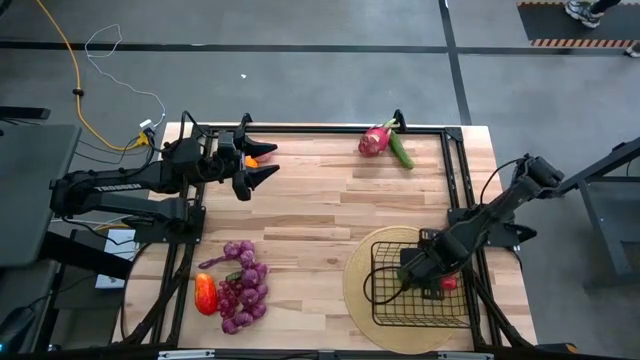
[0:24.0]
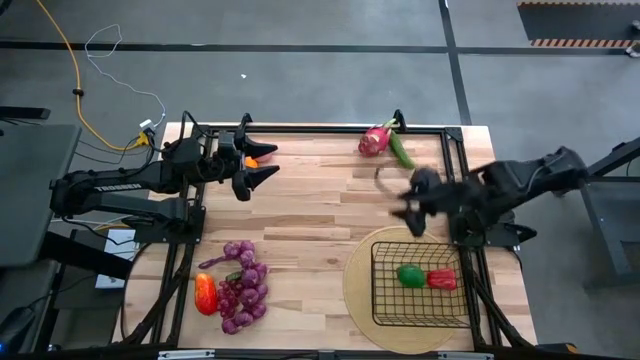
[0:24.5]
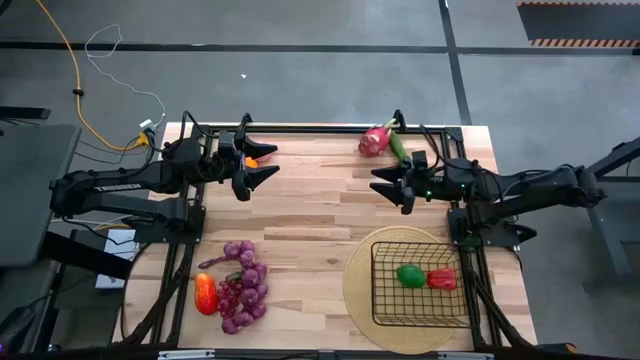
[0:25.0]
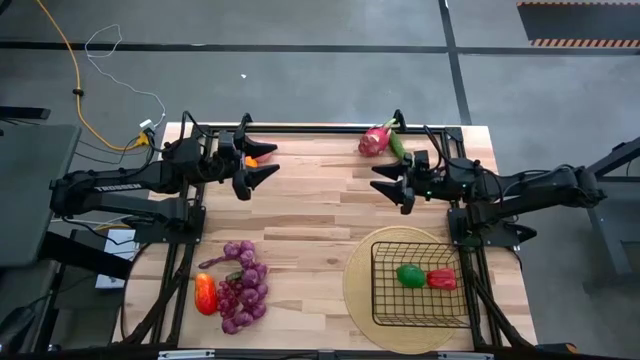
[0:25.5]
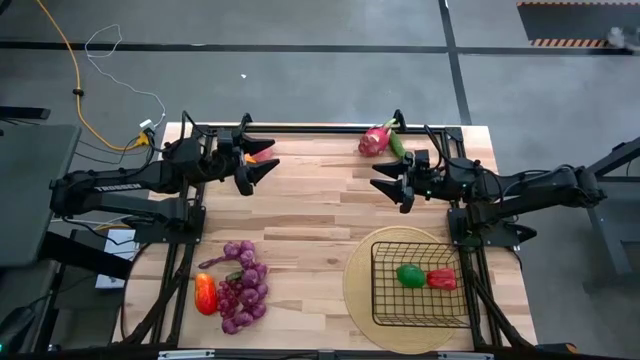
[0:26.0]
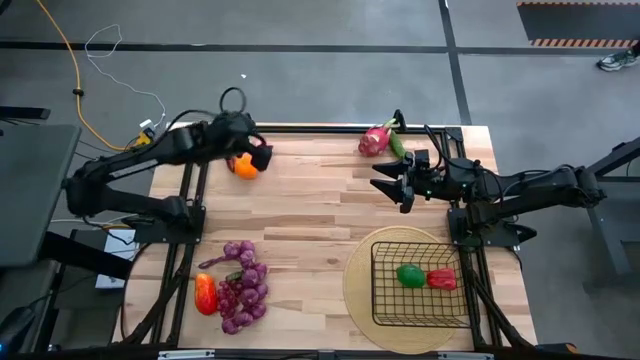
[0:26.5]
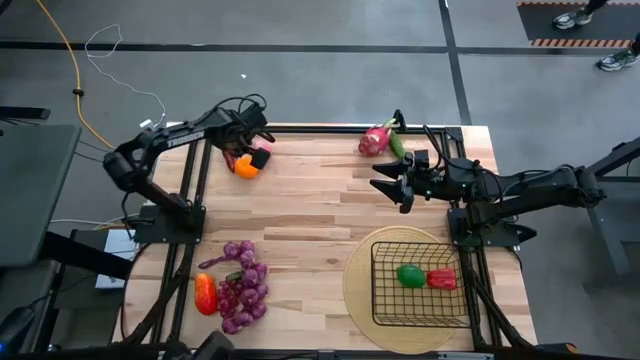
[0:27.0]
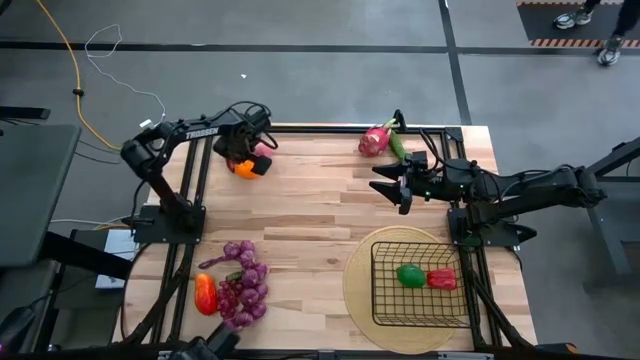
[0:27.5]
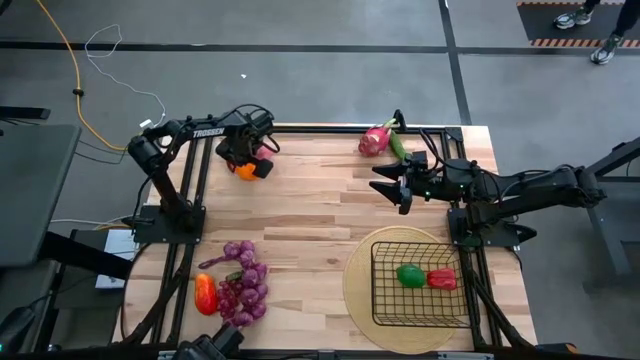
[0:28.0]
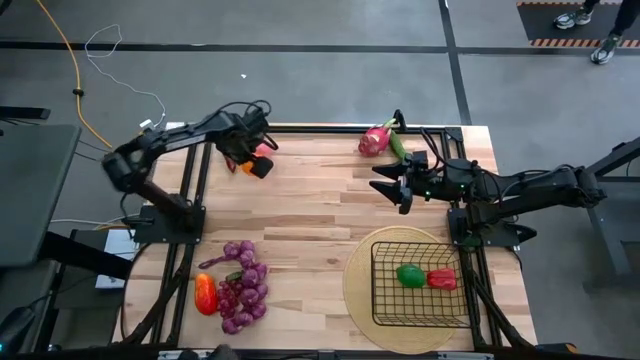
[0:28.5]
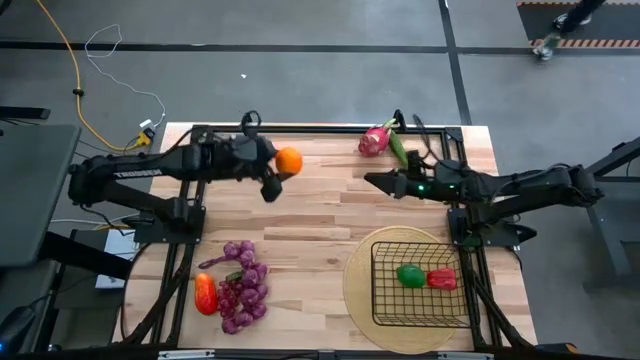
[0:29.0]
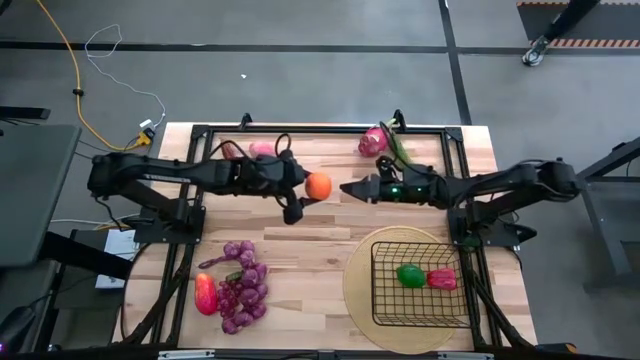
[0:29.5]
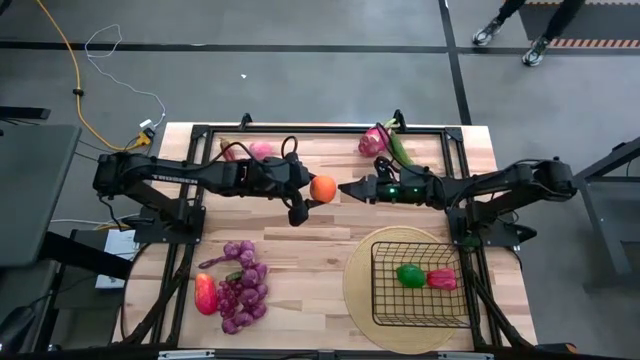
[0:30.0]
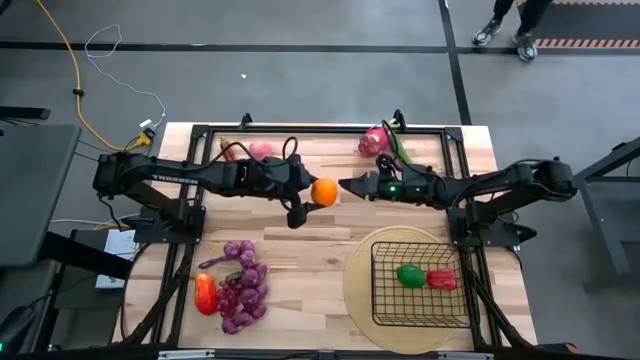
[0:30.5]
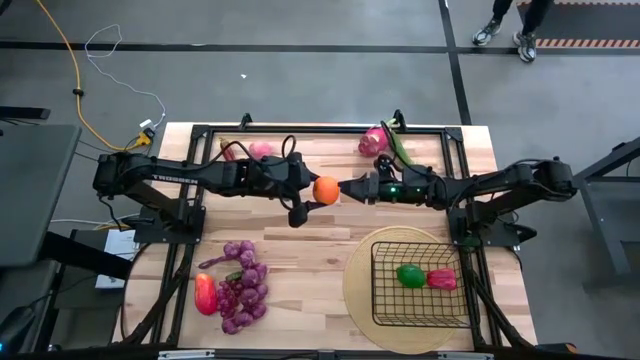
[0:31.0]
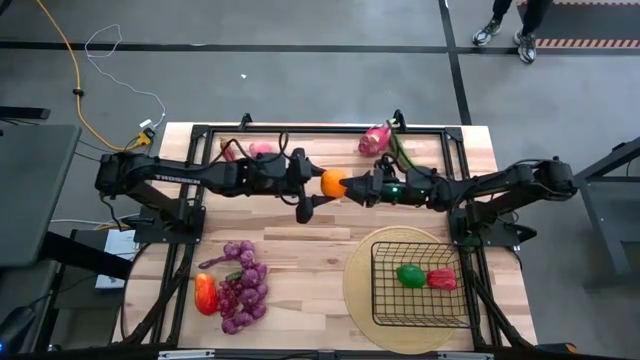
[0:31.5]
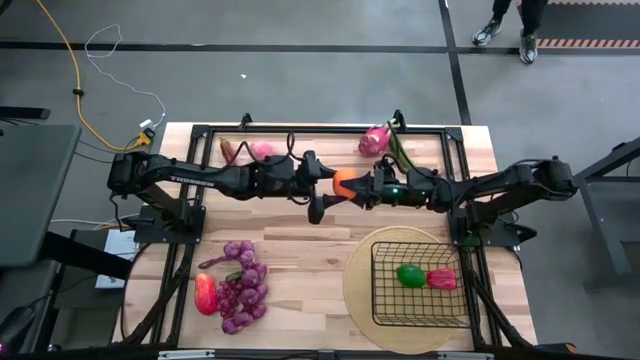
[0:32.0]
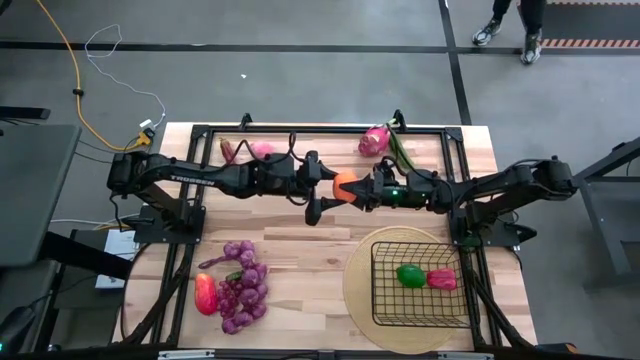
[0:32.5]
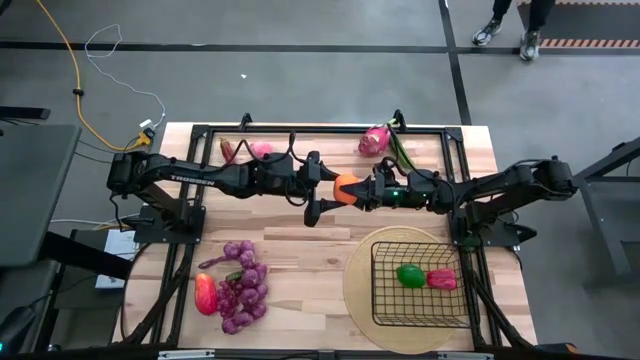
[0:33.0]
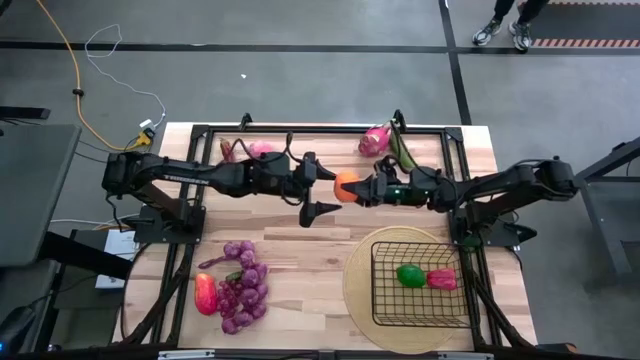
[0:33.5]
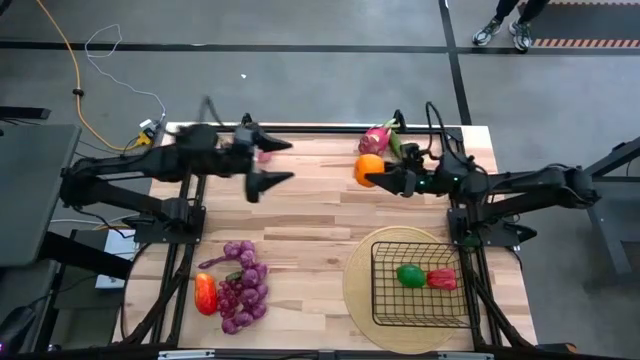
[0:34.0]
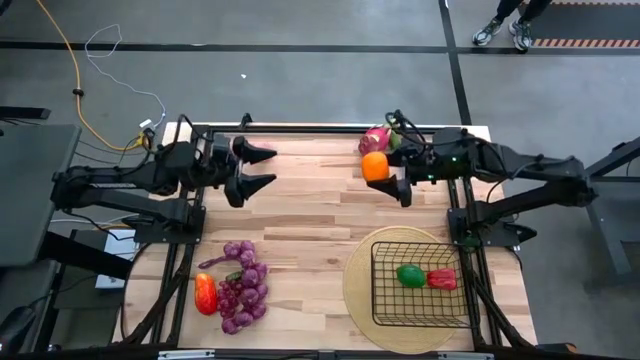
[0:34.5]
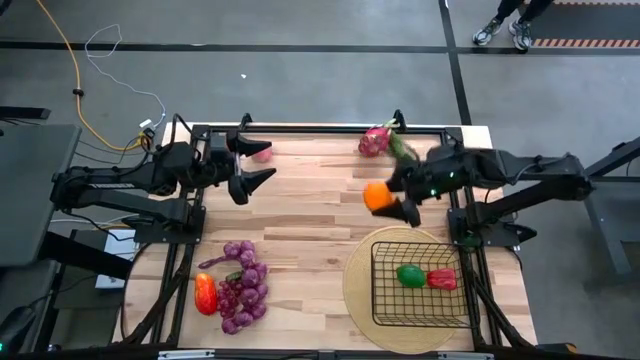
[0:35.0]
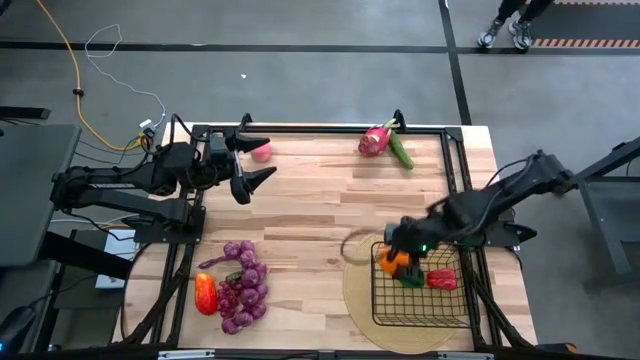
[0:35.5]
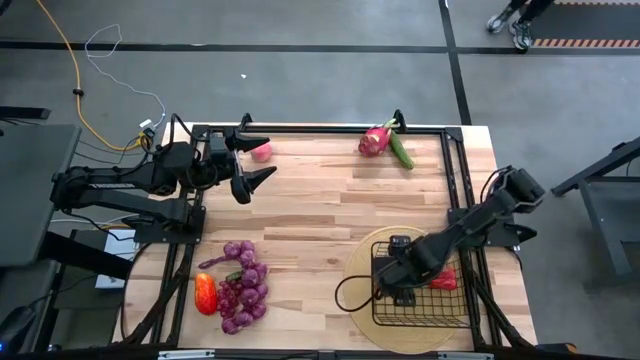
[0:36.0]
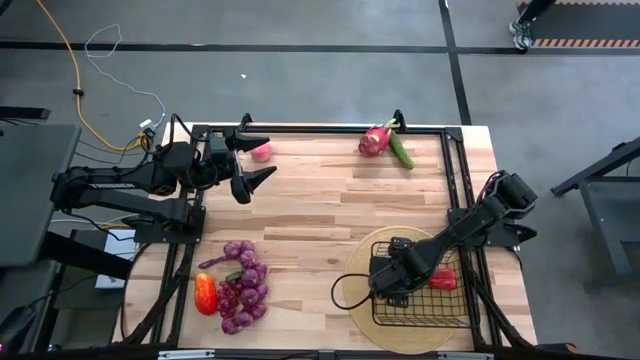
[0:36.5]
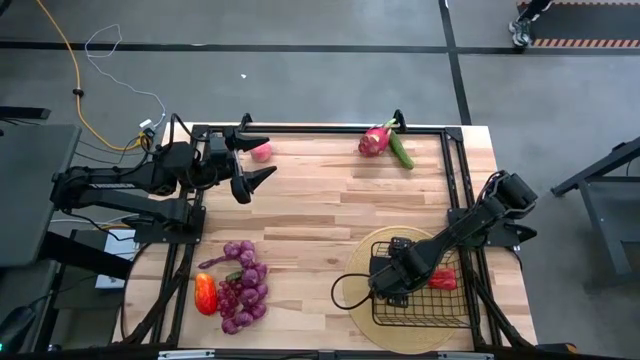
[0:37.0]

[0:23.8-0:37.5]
Task: Build produce basket
Put the orange into the wire basket

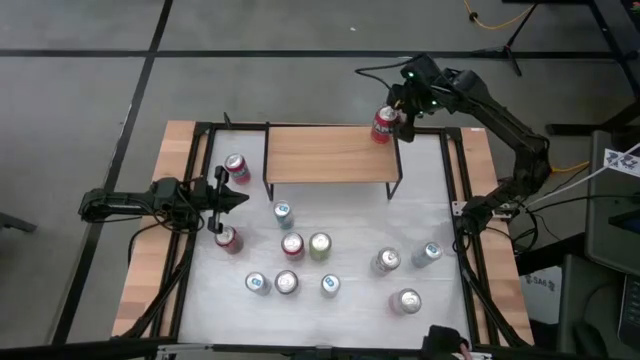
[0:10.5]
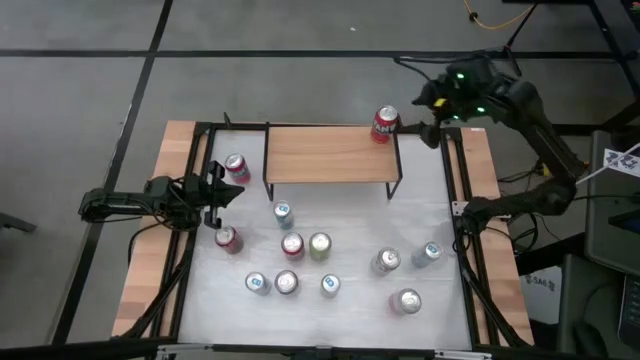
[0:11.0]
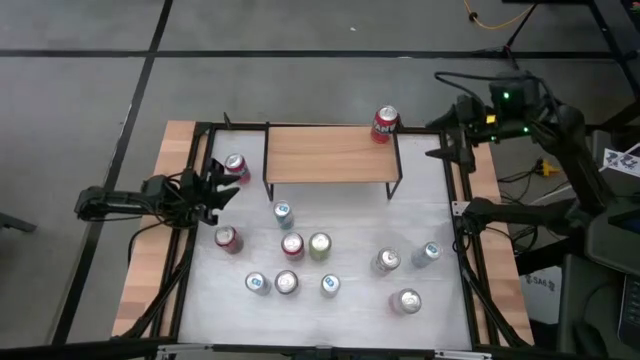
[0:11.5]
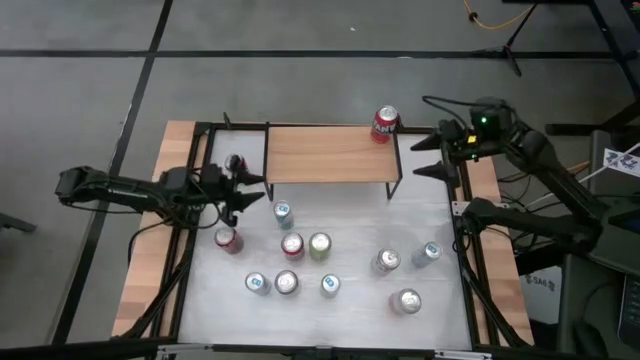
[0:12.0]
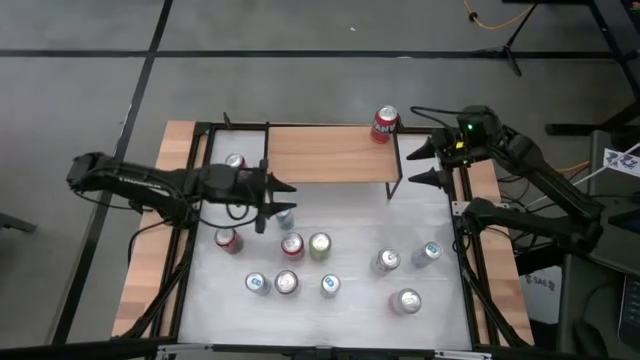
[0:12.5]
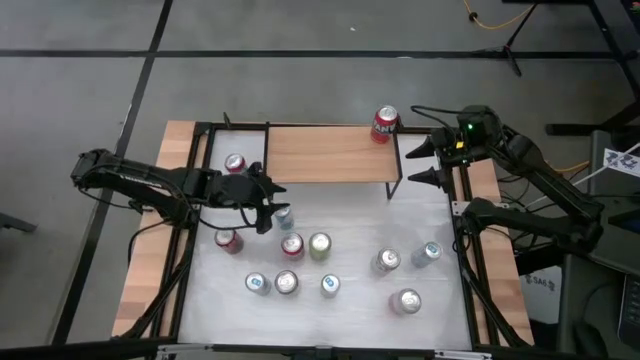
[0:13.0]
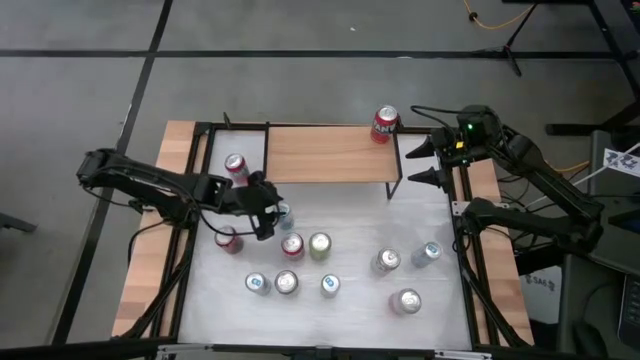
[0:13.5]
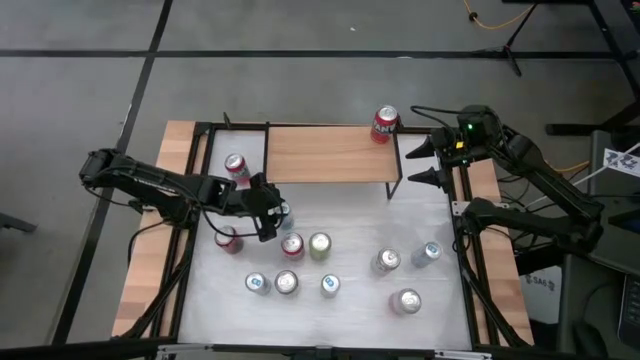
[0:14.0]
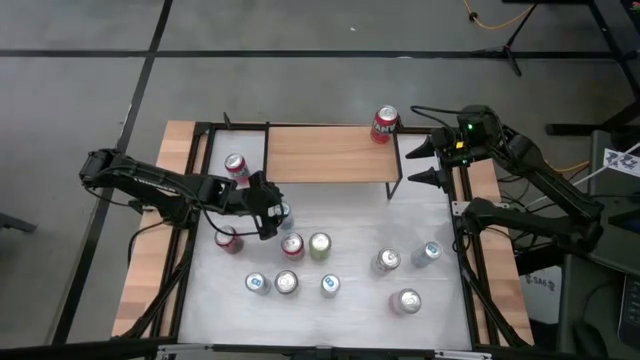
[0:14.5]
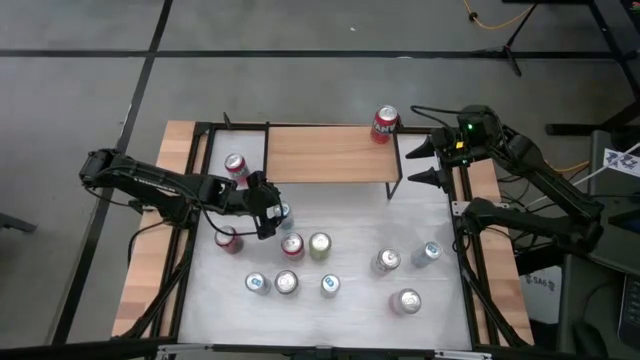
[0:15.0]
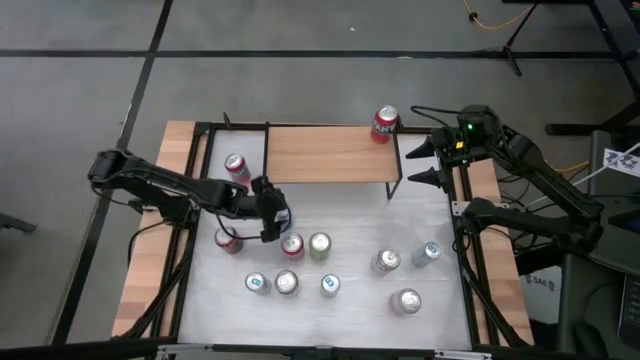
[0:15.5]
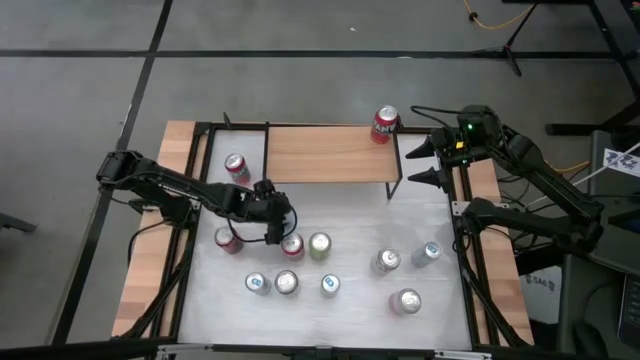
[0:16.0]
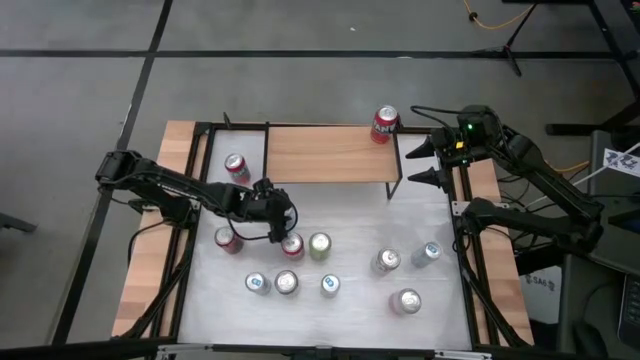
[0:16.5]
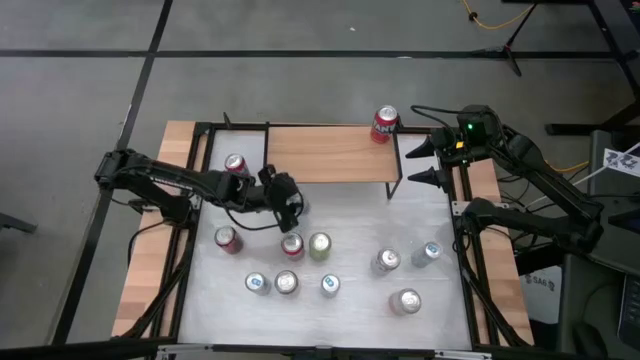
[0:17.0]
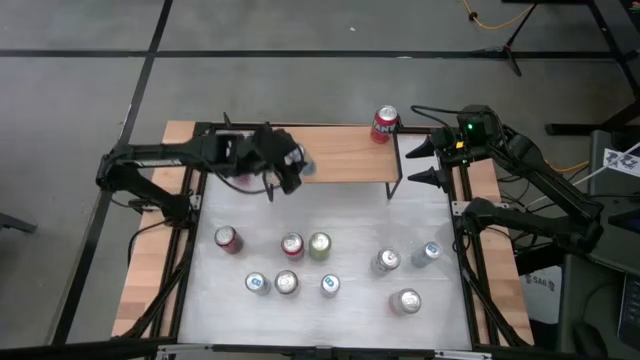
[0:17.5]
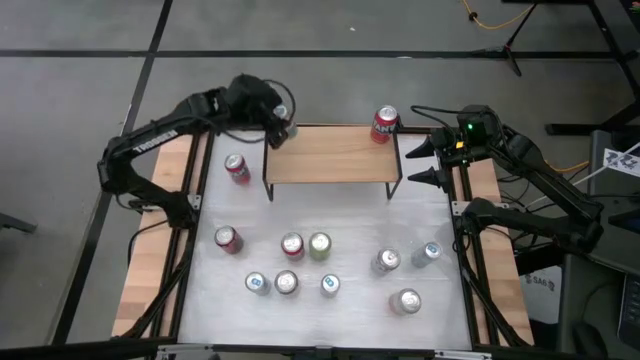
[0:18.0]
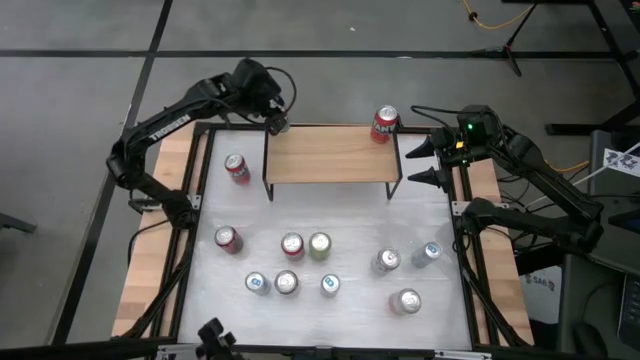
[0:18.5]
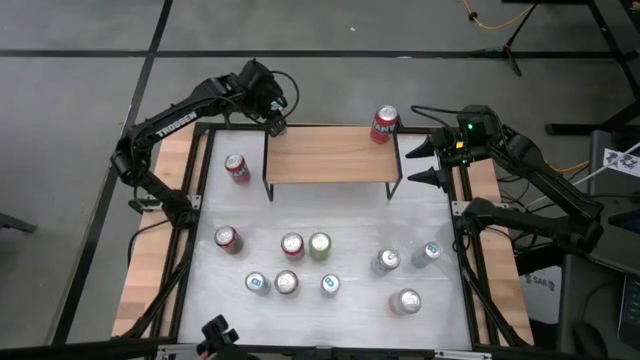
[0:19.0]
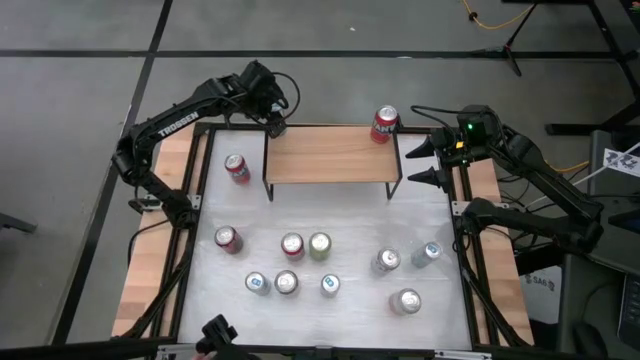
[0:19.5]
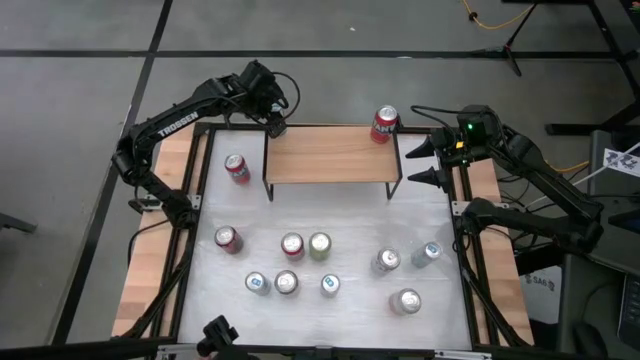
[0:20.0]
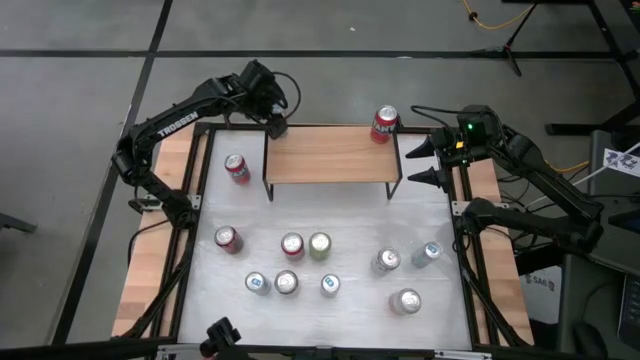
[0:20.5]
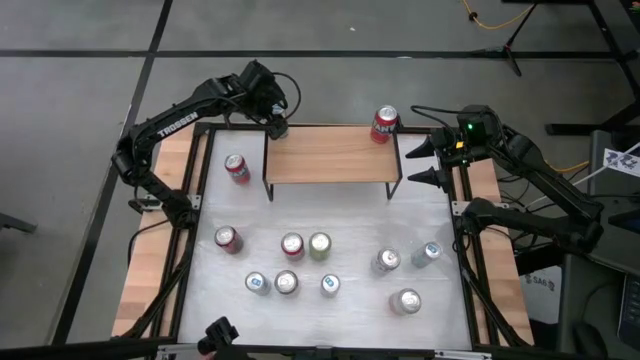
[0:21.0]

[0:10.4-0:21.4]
Task: Sort soda cans
Put the top left blue soda can on the shelf
